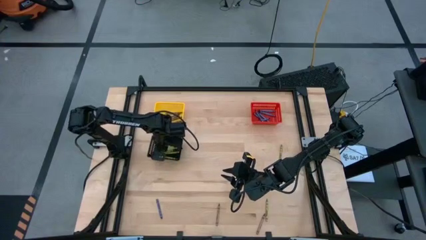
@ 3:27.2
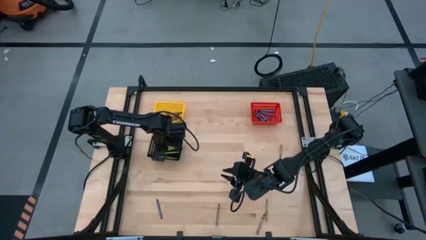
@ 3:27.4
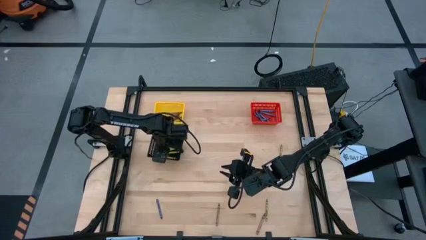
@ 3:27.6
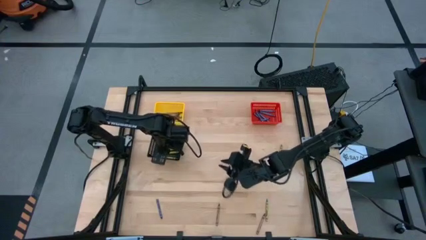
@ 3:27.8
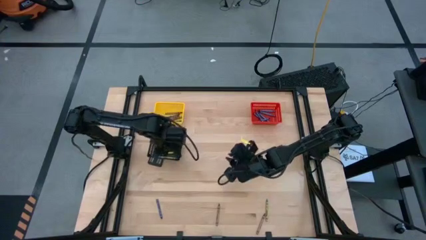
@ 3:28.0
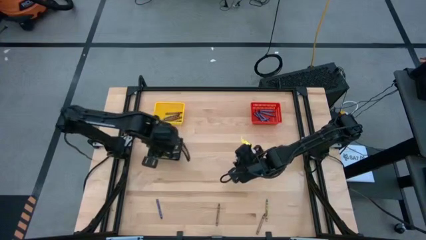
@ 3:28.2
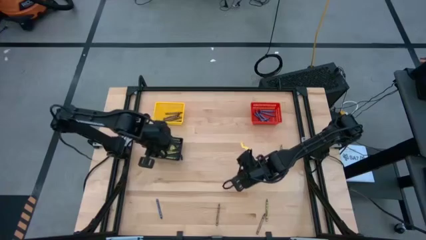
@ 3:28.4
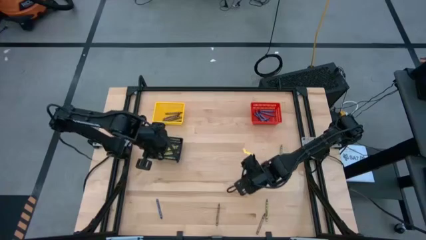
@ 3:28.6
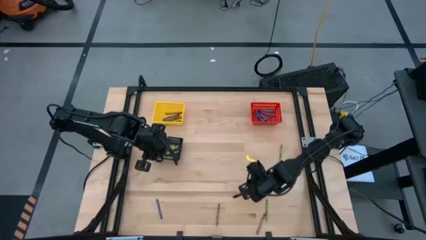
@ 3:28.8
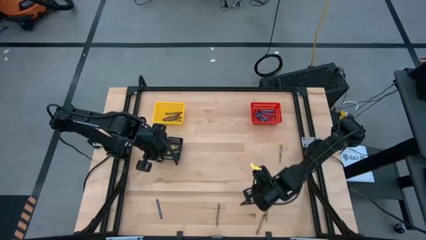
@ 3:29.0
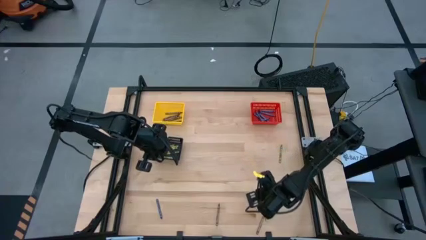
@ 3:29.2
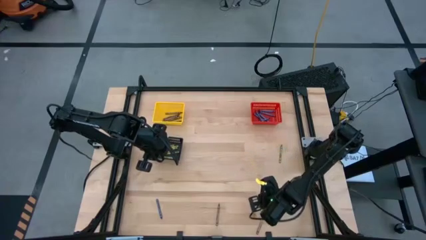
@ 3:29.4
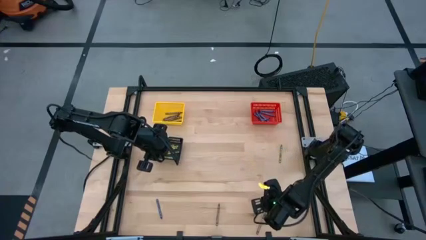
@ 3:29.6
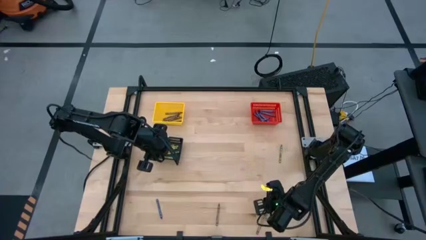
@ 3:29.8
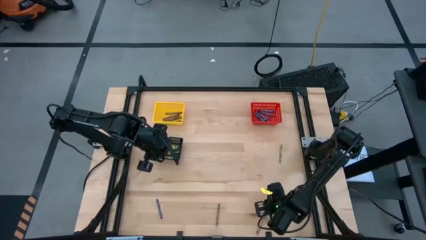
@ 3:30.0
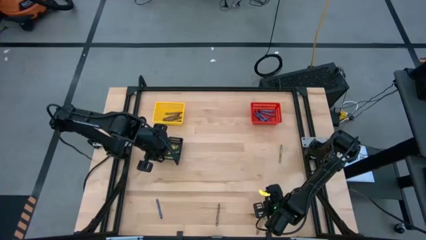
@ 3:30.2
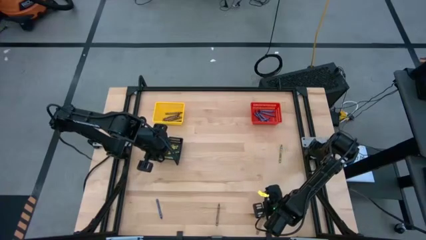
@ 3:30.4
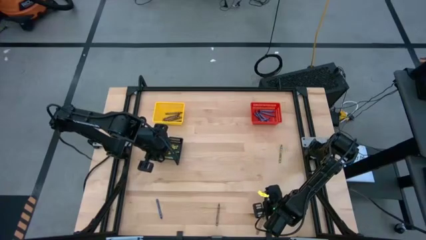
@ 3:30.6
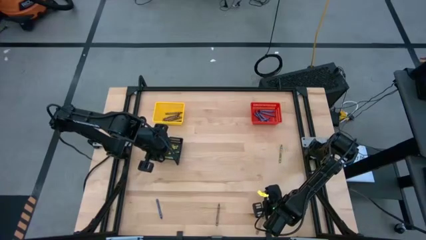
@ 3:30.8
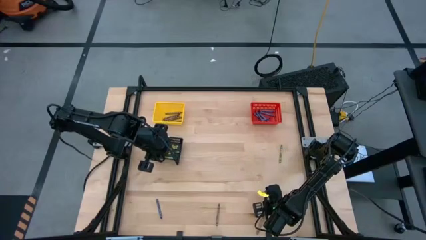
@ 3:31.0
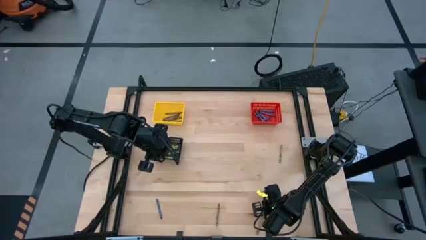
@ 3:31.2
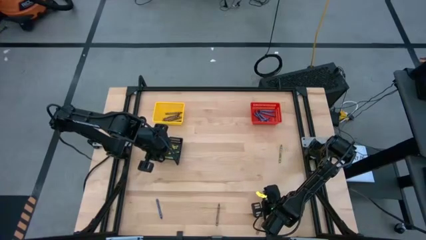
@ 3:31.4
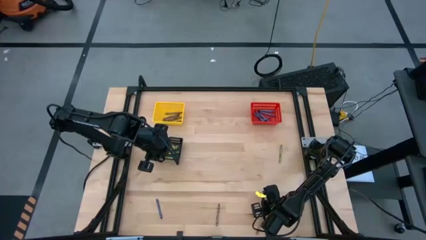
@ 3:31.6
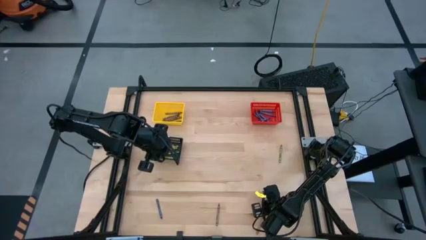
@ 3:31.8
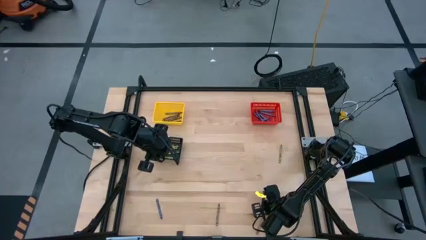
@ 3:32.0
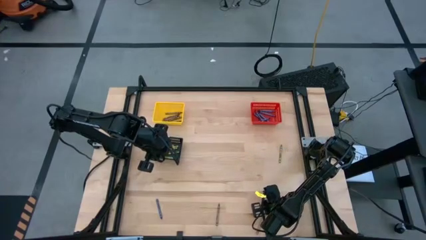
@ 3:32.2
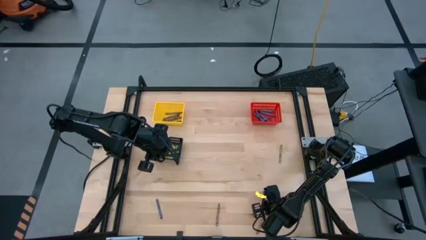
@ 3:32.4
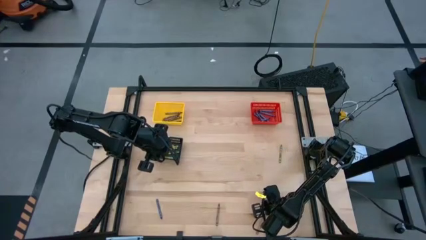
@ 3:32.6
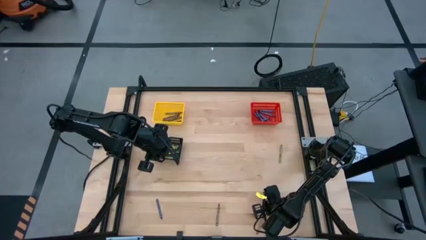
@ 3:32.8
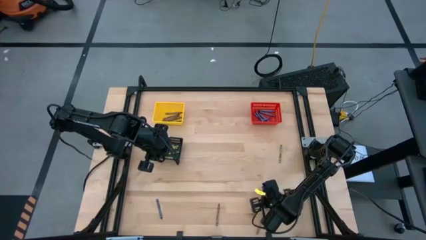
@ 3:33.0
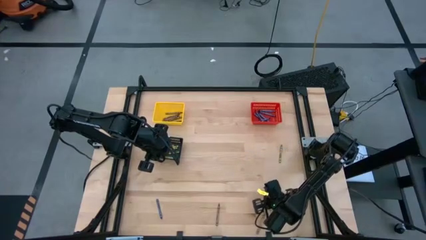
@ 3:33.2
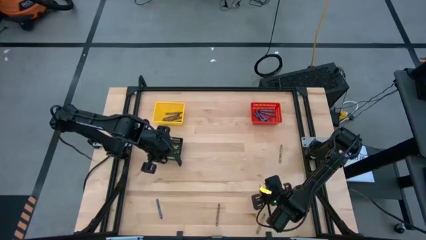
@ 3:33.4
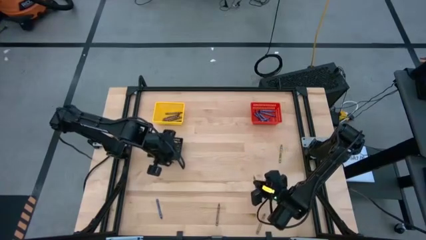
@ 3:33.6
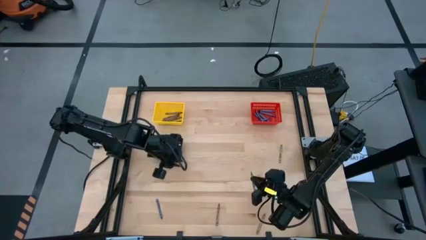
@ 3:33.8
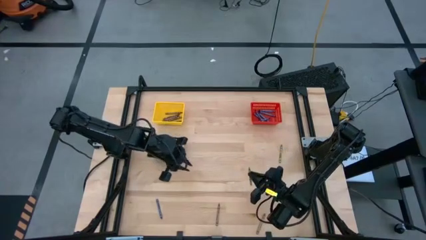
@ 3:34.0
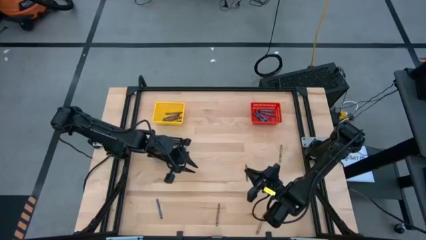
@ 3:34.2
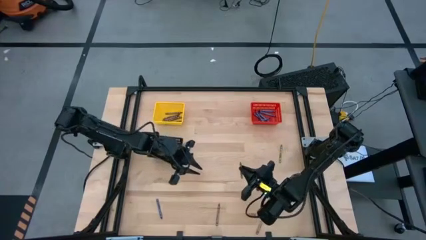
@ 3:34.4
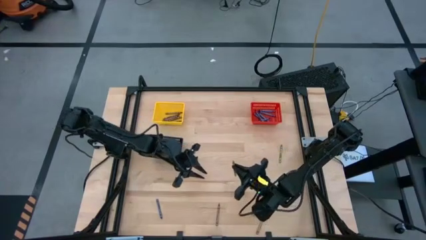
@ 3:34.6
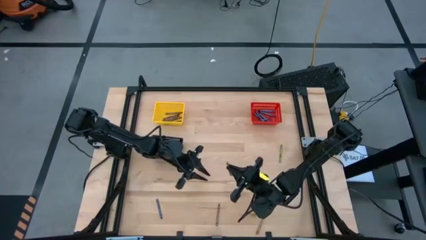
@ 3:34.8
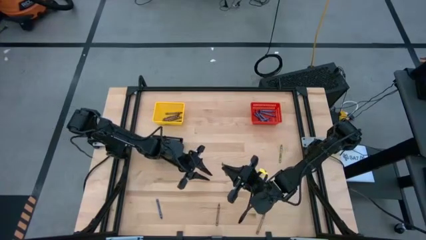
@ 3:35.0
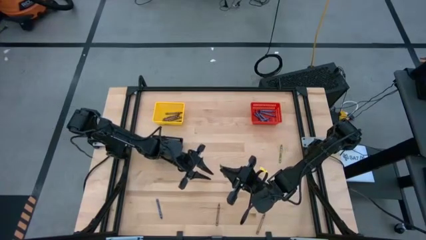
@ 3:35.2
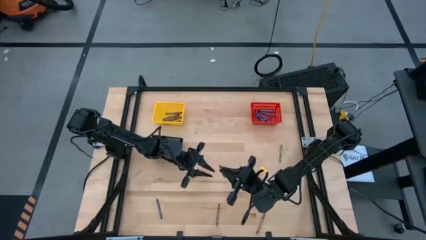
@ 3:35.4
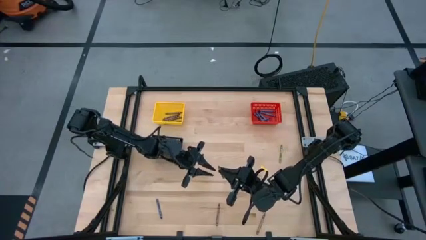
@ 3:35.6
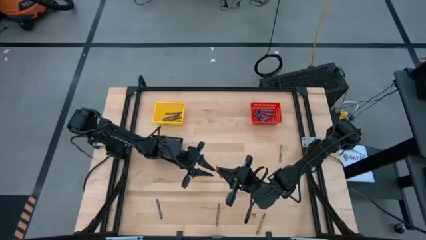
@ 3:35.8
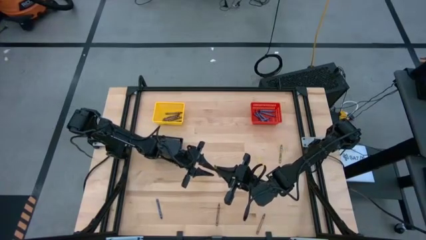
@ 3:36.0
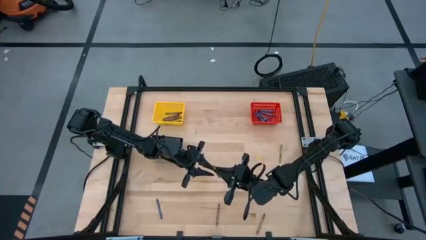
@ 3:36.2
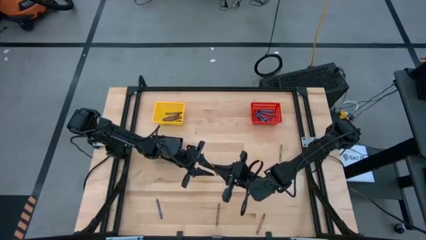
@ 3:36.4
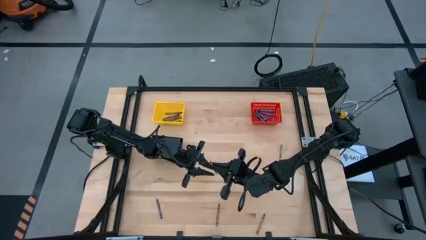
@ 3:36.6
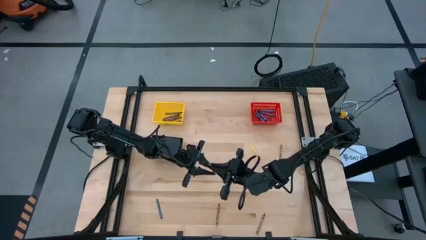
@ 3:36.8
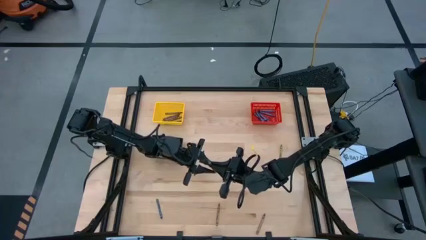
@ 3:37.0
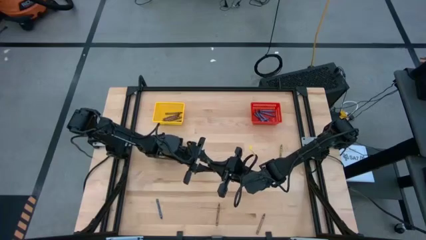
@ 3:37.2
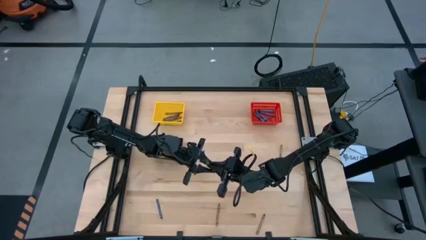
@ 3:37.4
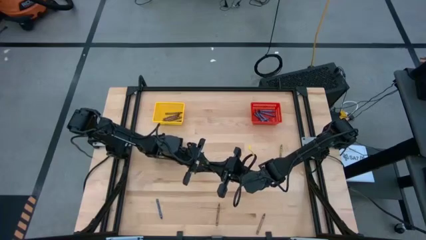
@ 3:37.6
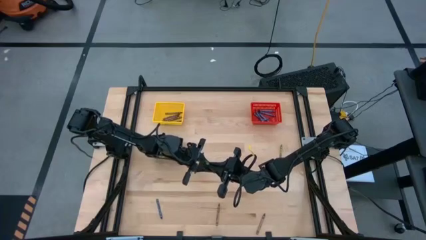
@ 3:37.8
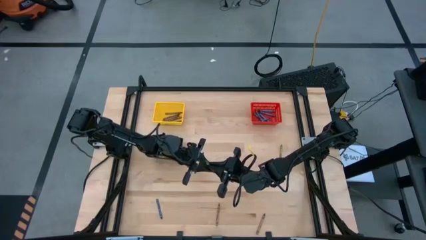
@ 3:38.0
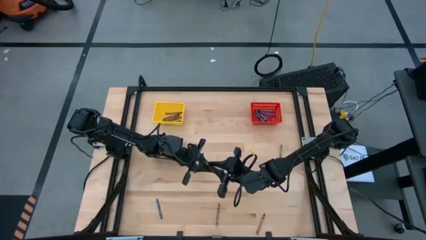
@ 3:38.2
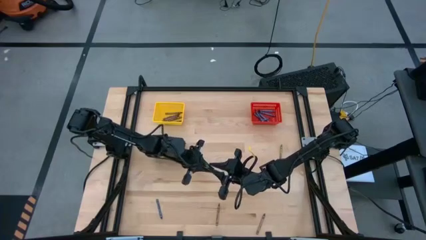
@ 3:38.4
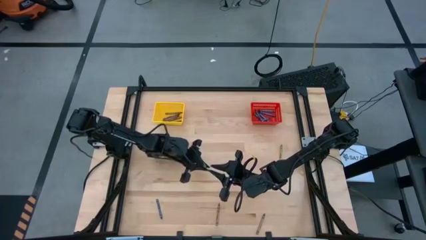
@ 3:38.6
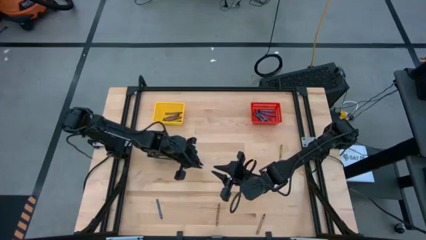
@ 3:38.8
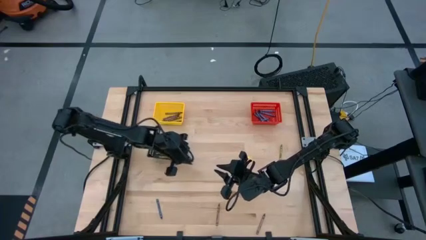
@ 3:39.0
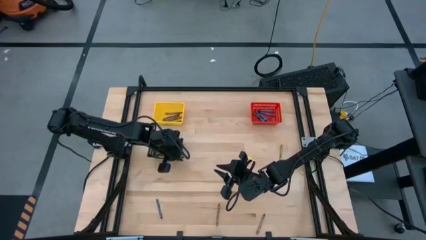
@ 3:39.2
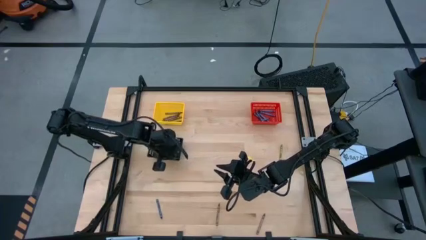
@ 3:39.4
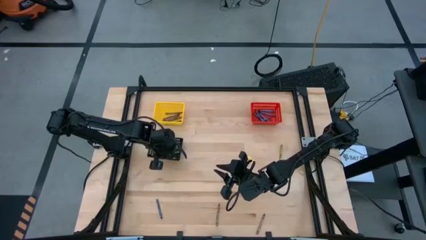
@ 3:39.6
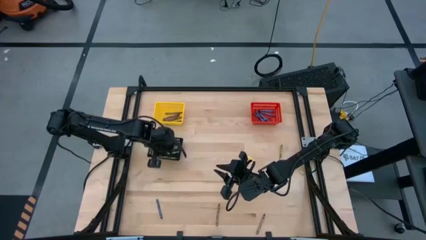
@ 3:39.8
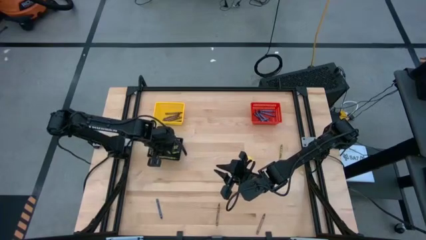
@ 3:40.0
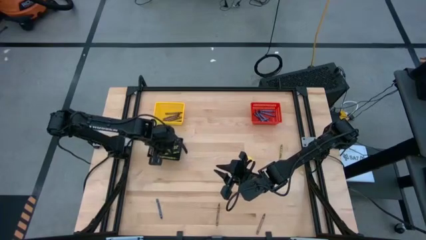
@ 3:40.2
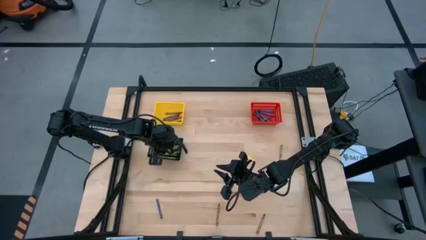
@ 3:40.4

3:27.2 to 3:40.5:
Task: Sort crayons
Put the green crayon into the black bin

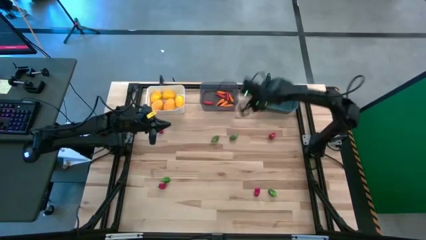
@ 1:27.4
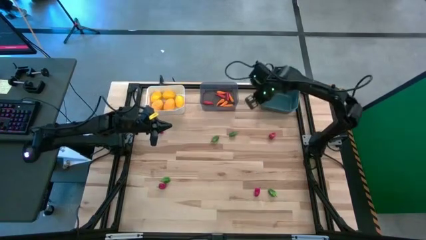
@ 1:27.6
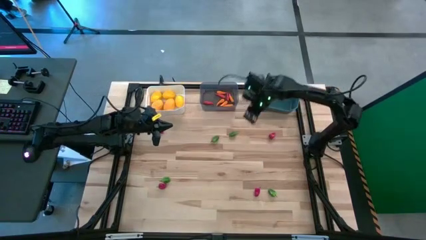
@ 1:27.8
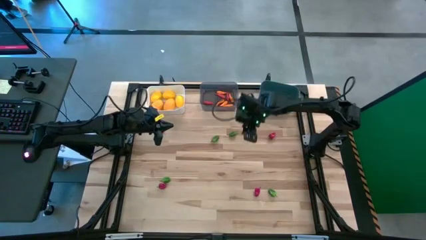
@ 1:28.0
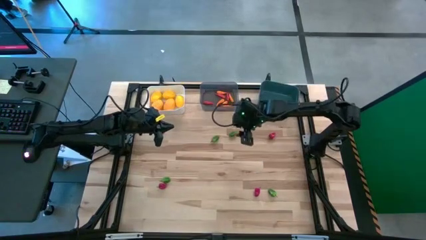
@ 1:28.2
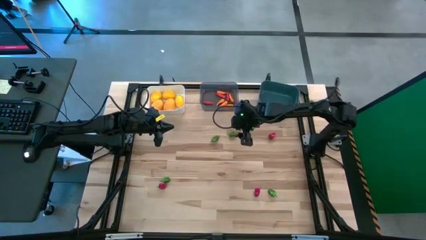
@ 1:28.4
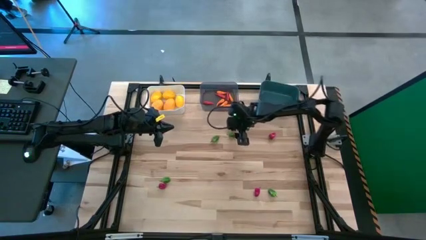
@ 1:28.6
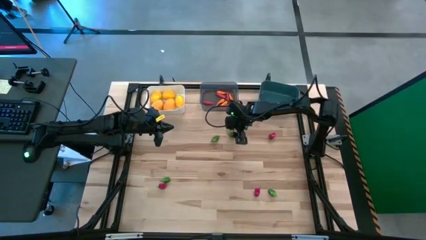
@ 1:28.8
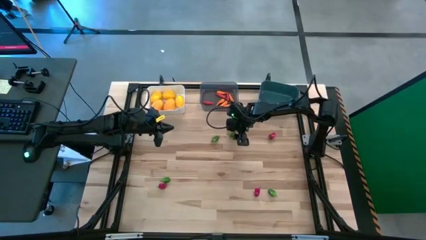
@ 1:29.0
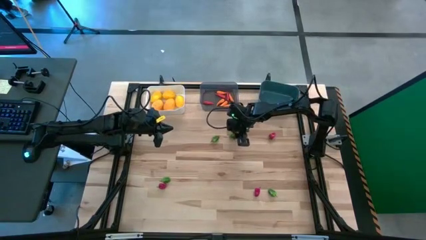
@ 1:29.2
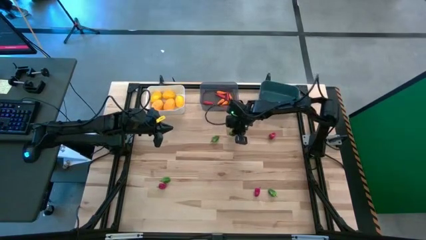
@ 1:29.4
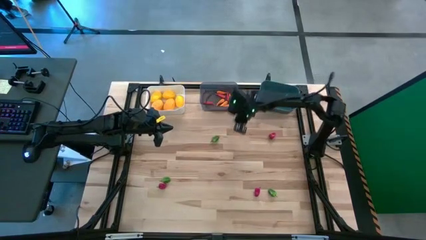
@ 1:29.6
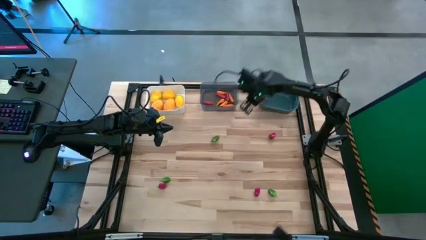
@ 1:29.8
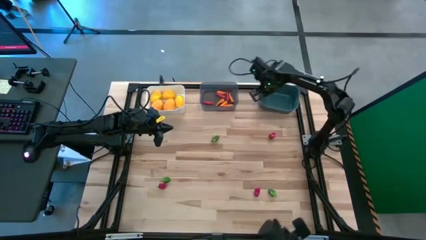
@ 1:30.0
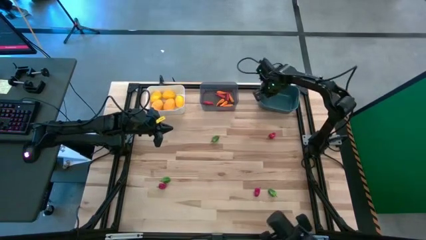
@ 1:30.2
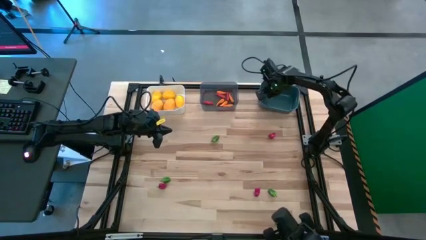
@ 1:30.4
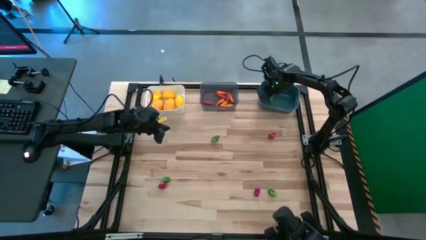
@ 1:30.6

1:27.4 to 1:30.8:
Task: Sort produce into baskets
Put the bottom middle green bell pepper into the blue bin
